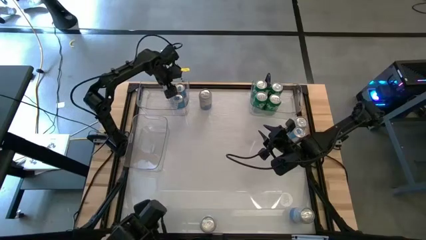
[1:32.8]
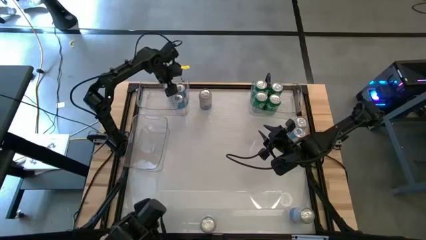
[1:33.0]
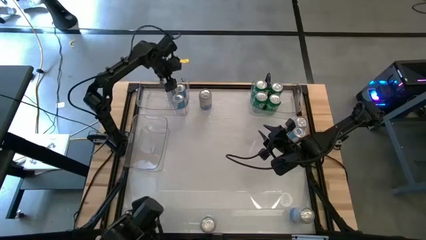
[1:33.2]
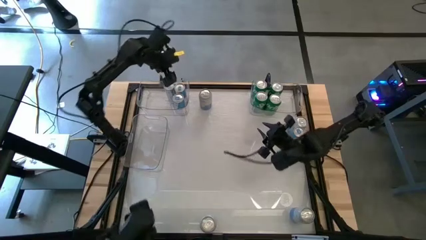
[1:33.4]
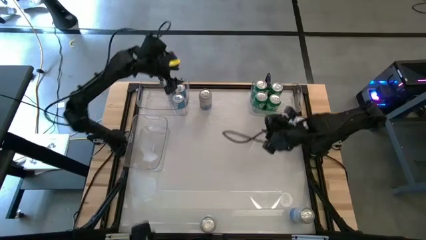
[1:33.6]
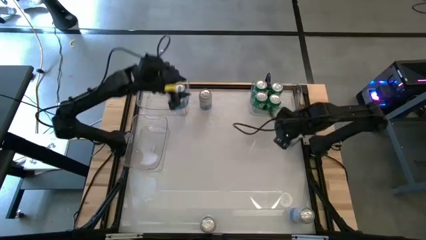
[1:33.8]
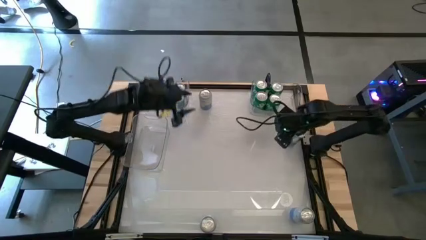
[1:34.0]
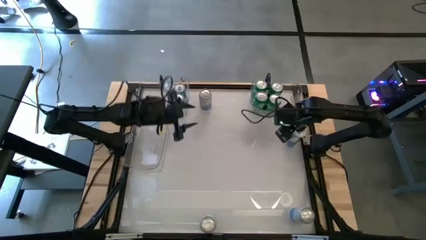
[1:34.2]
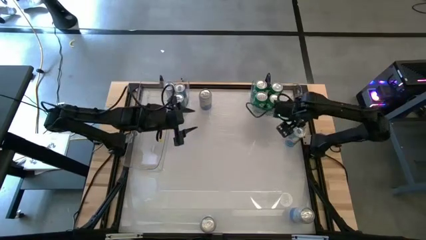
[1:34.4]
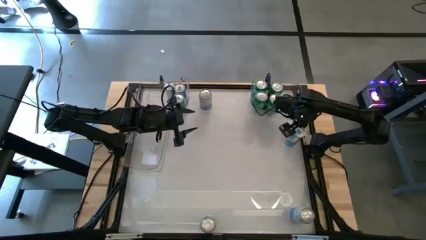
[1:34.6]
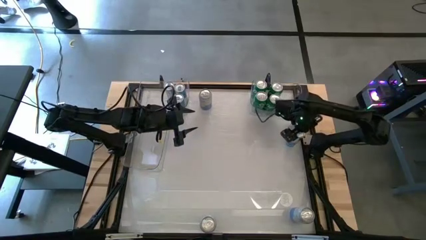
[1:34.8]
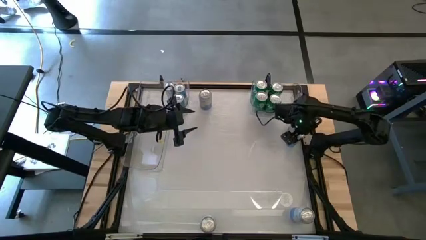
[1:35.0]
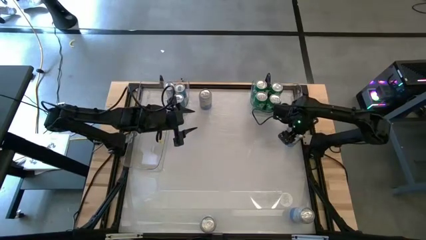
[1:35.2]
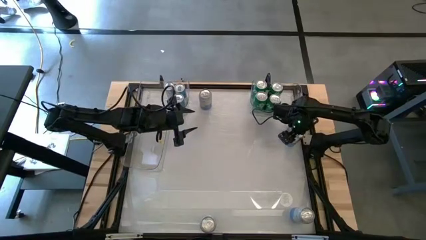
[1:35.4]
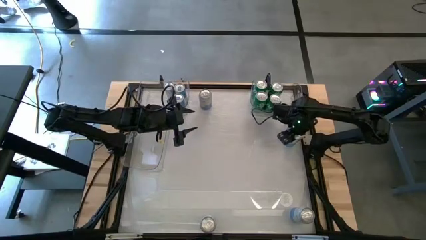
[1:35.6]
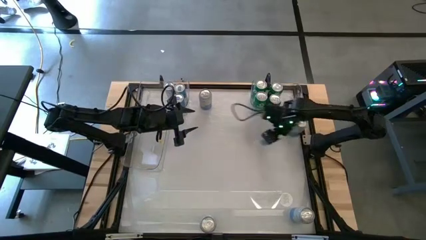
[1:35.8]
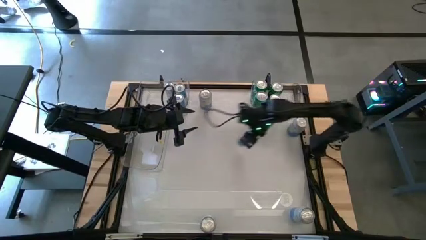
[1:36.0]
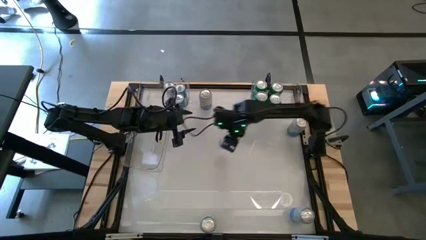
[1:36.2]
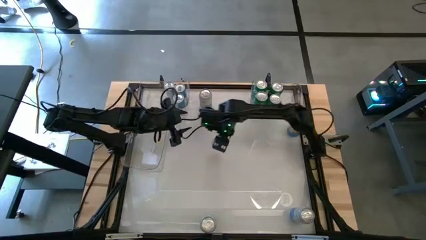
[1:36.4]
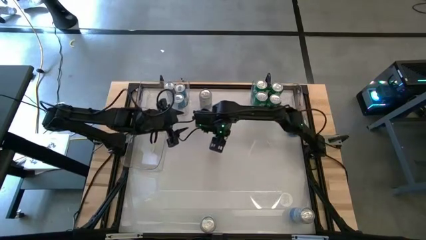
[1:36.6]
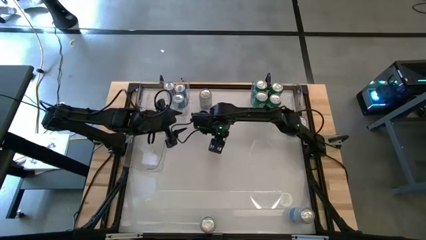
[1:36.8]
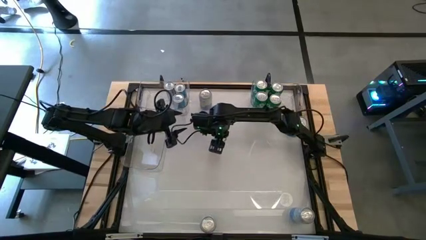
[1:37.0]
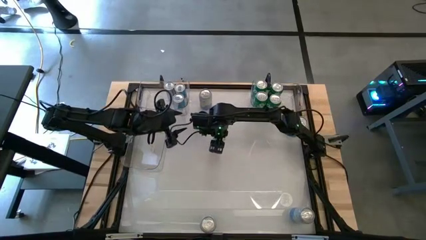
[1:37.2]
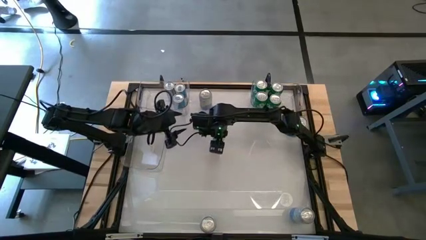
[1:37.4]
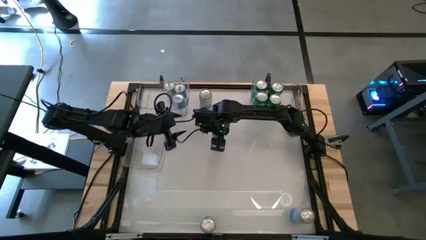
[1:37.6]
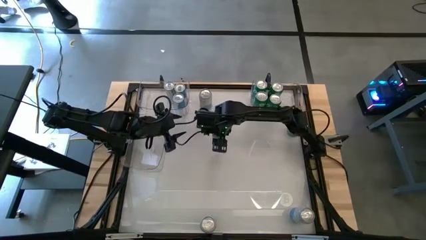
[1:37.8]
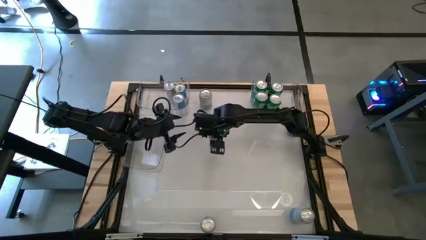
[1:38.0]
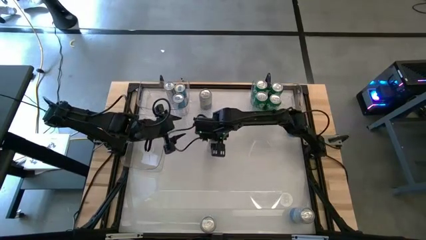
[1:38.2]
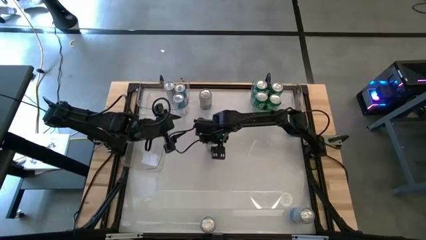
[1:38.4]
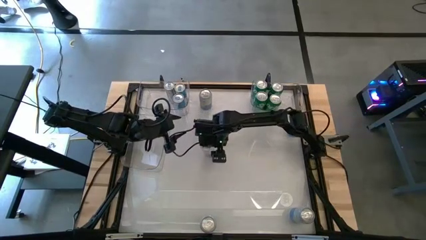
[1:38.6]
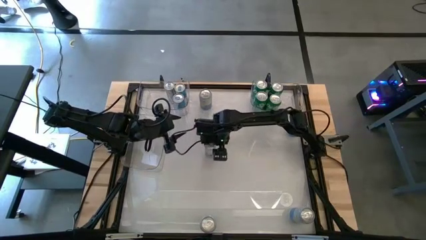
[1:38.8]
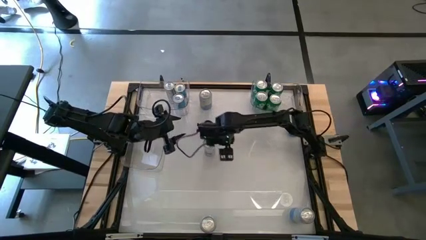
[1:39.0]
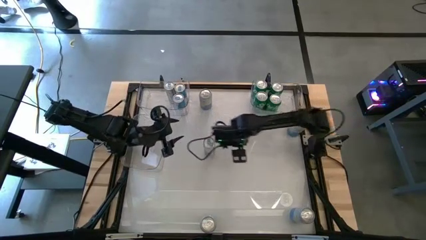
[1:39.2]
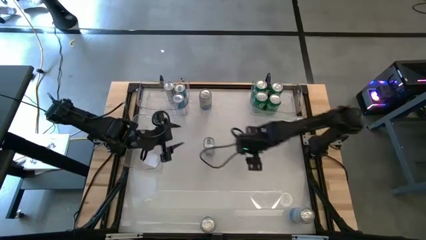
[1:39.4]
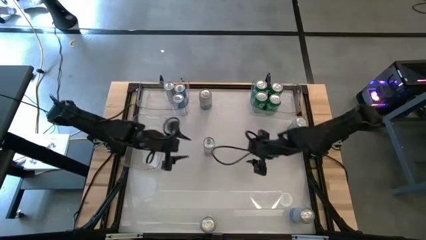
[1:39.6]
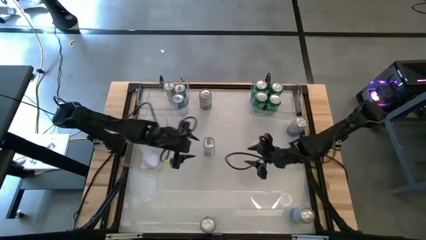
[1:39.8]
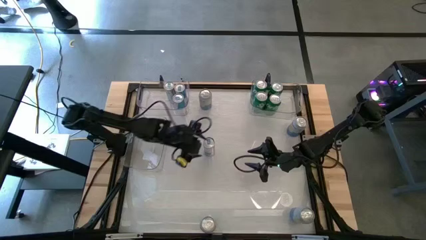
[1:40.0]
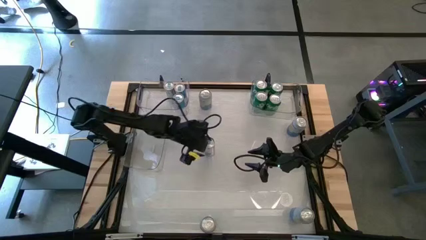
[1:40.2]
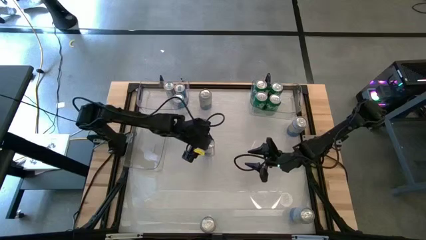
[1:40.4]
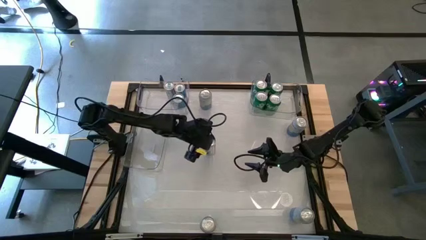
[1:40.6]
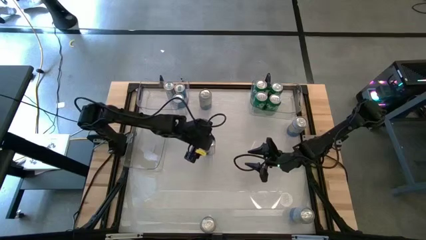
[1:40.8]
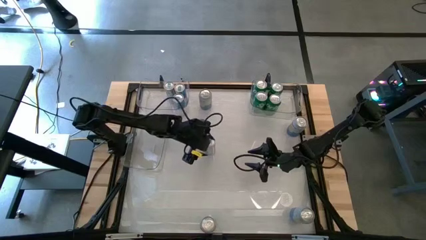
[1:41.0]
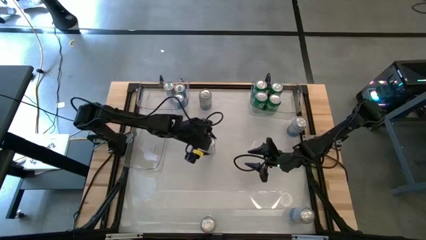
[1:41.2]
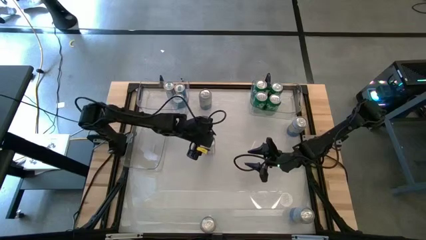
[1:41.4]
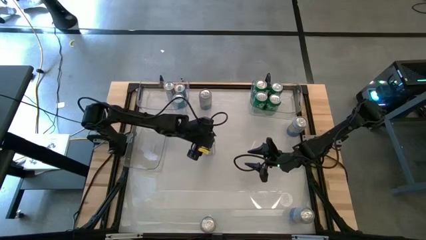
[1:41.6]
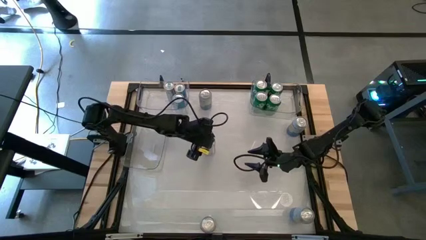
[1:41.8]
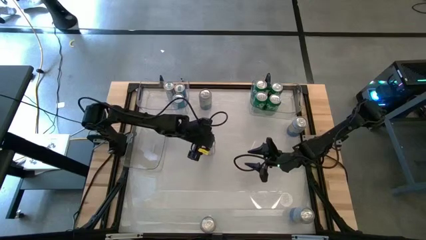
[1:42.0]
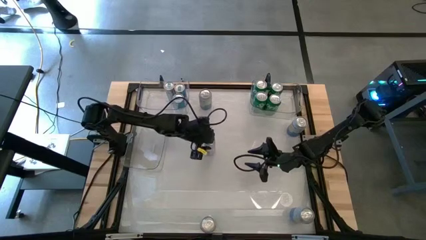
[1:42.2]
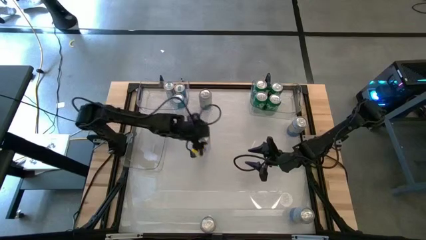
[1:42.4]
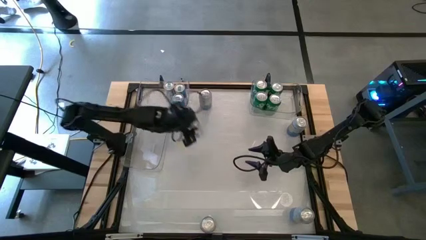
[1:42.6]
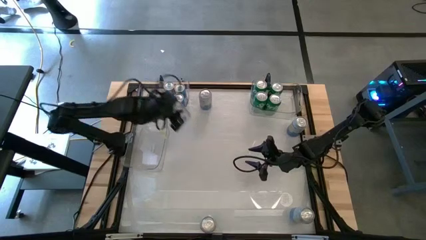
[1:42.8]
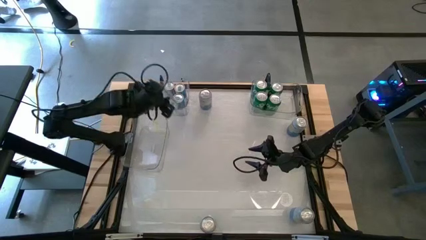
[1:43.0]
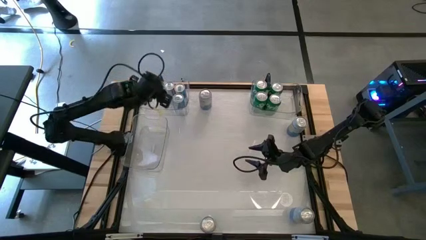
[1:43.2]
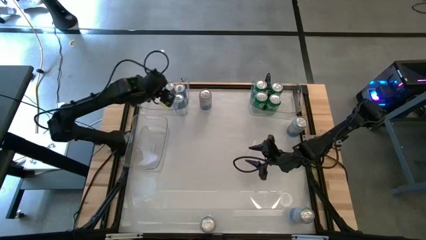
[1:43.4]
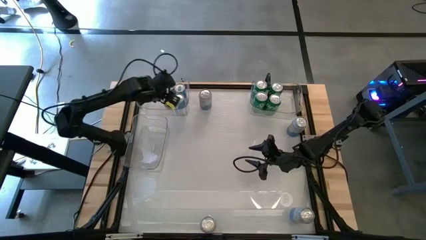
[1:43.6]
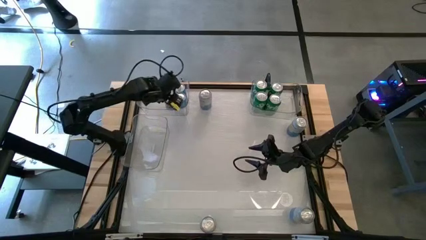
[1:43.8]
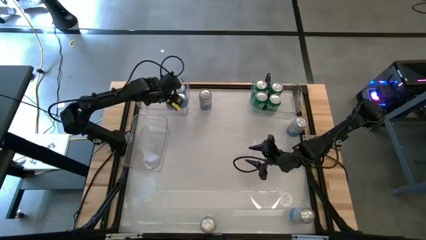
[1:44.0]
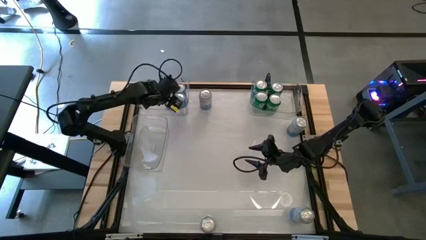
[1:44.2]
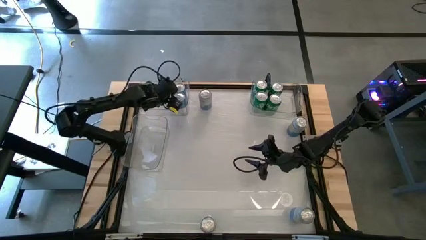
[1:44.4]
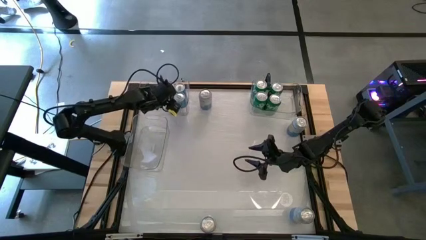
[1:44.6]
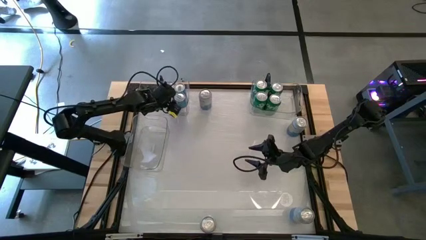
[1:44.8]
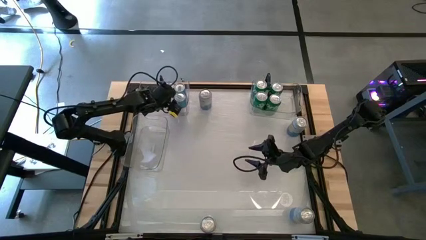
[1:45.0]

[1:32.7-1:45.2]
Task: Sort soda cans
Put the blue soda can into the top left transparent bin

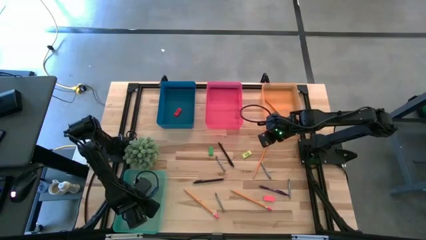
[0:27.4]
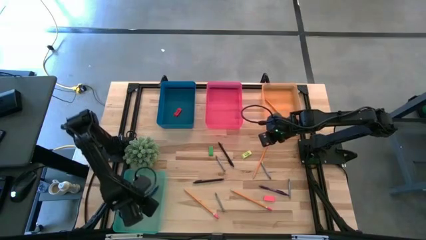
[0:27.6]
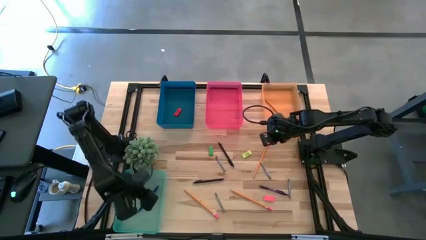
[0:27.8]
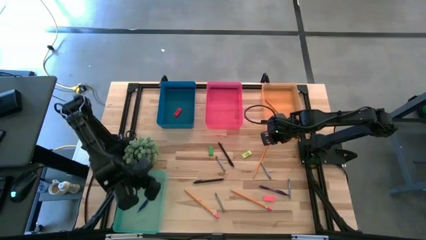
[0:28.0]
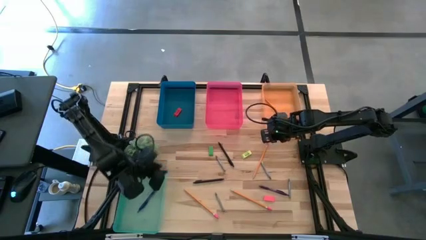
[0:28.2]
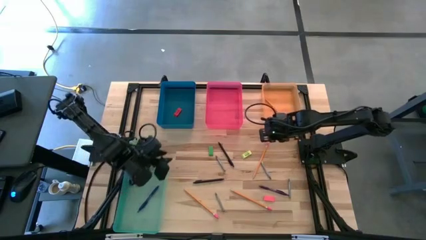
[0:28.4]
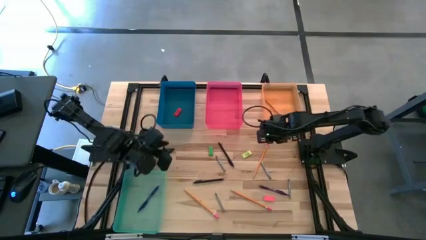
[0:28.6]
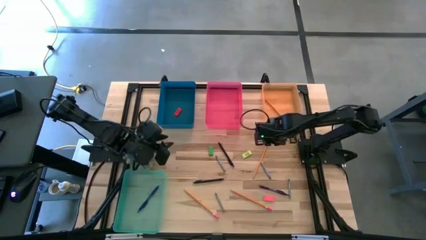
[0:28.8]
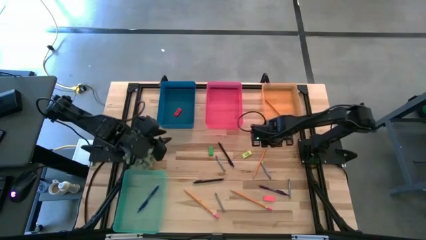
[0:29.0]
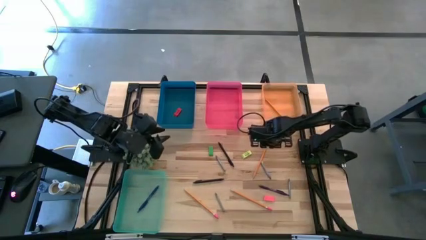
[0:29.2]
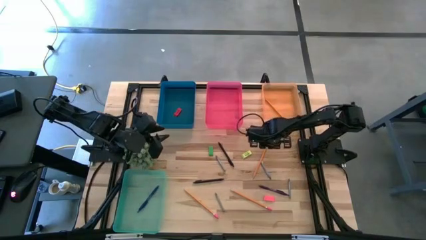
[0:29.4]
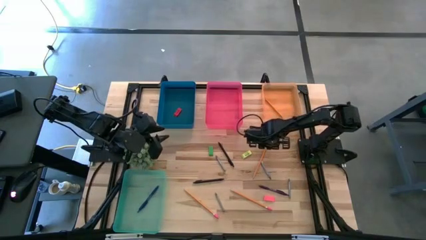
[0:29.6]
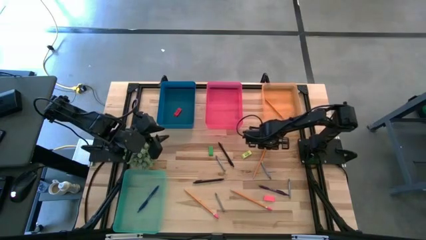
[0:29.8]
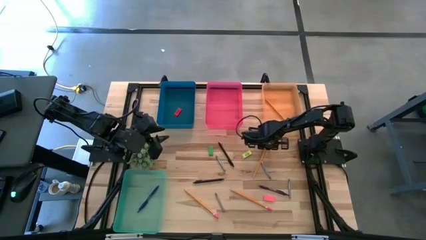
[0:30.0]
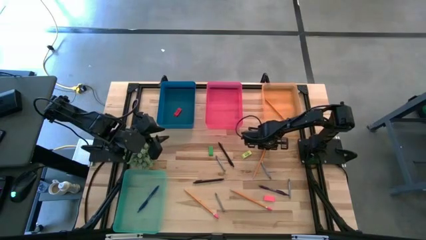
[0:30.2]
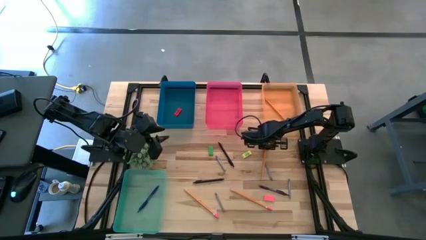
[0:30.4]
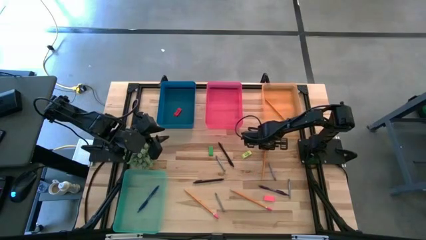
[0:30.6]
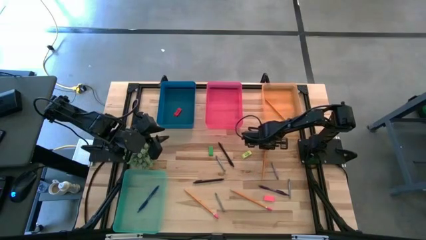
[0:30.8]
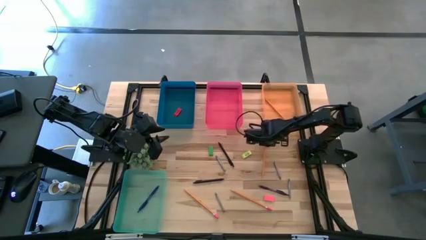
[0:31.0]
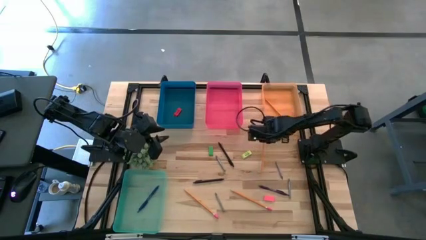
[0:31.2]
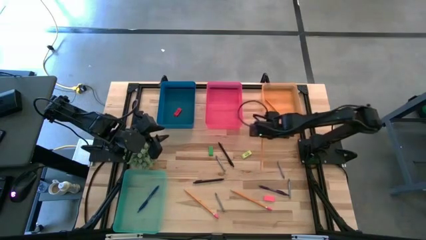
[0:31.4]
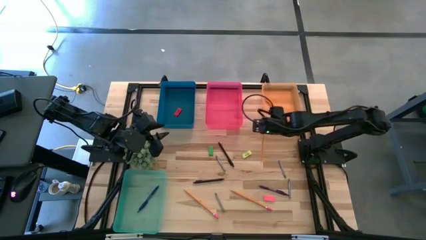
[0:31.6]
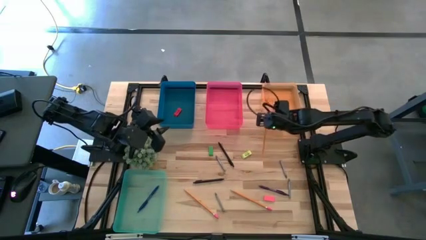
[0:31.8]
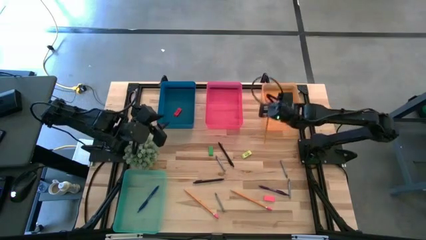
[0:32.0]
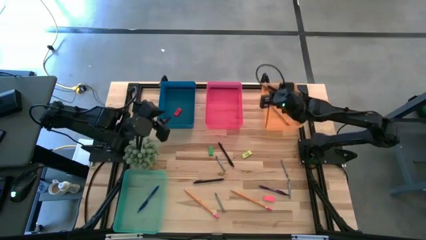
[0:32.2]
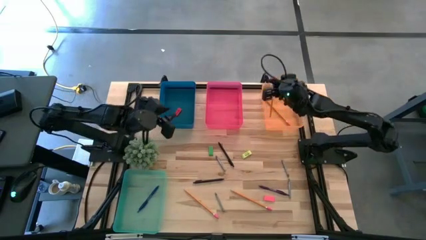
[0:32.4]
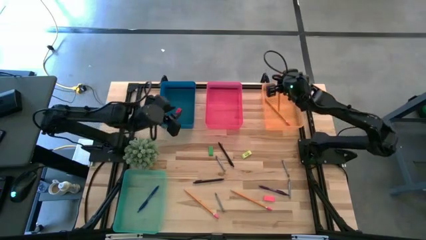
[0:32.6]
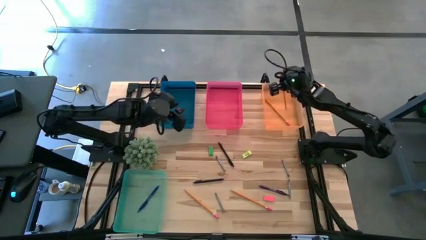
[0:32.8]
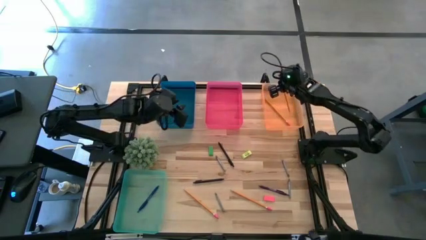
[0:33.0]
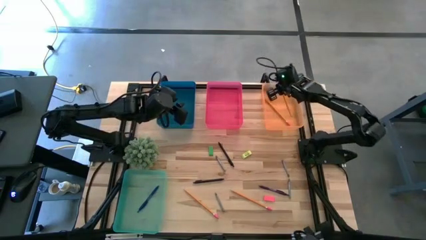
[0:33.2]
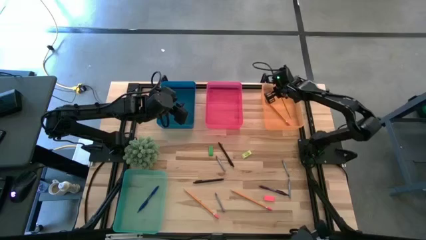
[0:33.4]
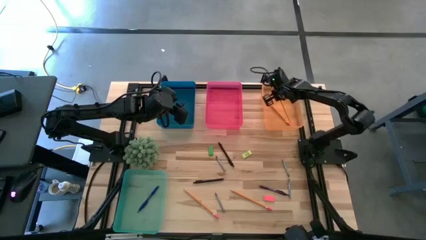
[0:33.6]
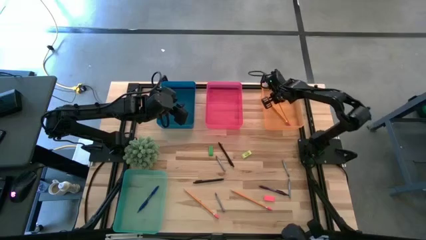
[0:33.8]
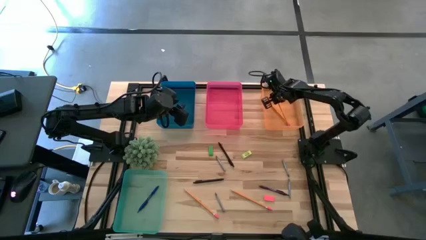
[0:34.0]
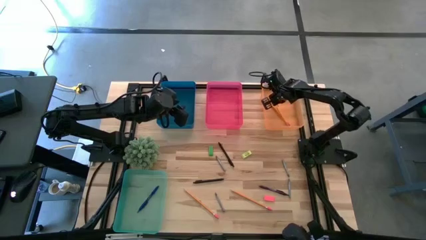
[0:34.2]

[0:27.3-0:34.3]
Task: Sort crayons/erasers/pens/pencils in bins
Put the top right pencil into the transparent orange bin
